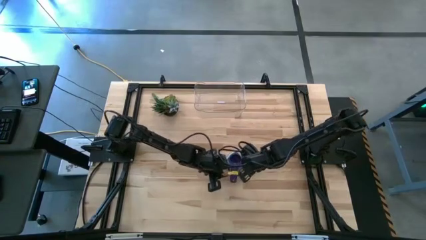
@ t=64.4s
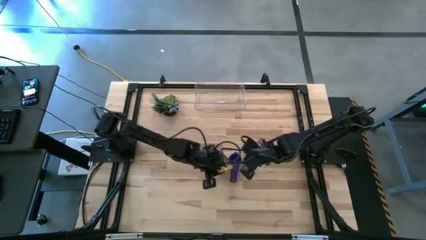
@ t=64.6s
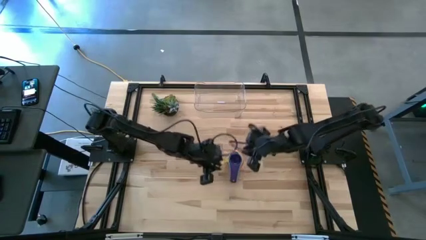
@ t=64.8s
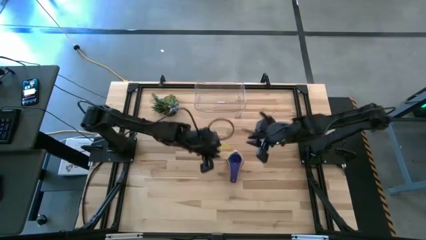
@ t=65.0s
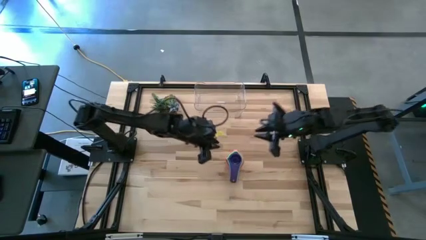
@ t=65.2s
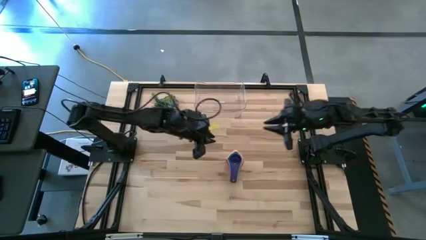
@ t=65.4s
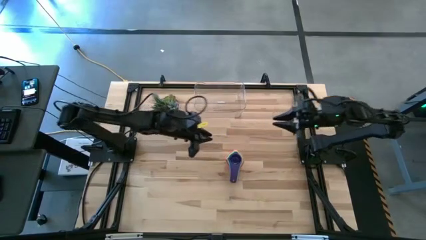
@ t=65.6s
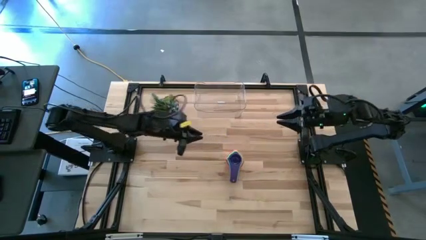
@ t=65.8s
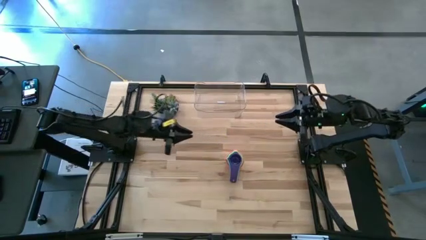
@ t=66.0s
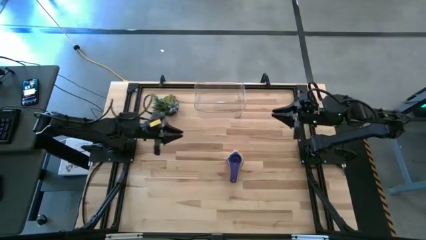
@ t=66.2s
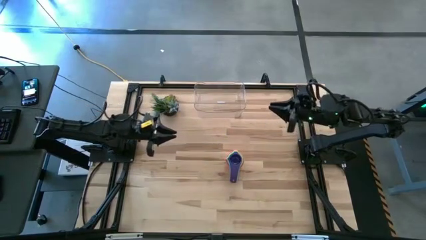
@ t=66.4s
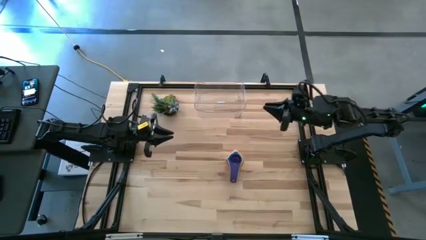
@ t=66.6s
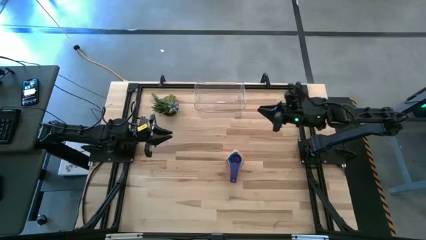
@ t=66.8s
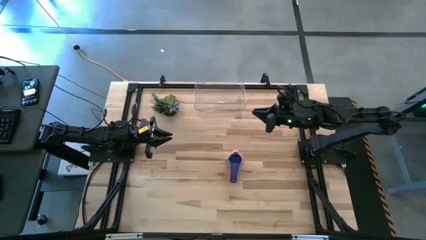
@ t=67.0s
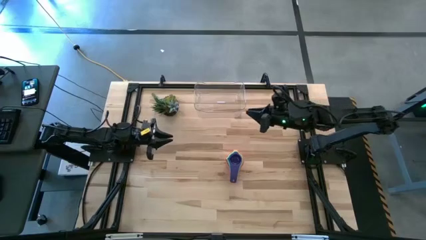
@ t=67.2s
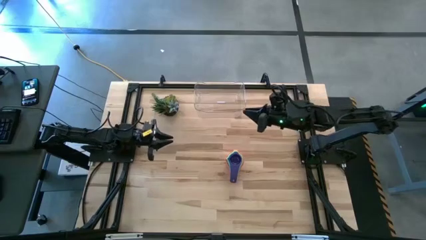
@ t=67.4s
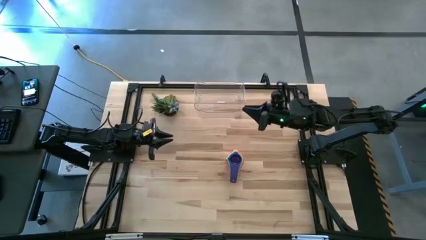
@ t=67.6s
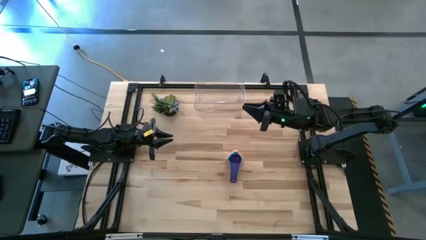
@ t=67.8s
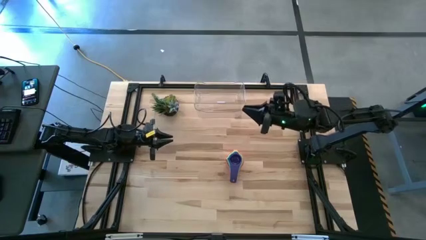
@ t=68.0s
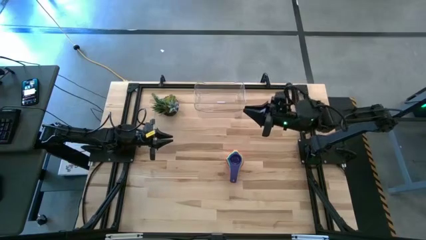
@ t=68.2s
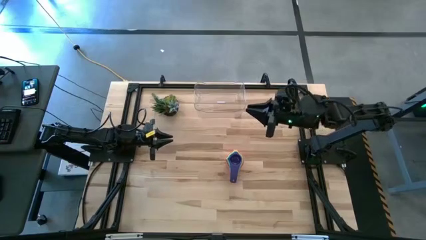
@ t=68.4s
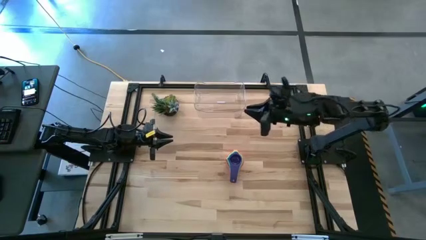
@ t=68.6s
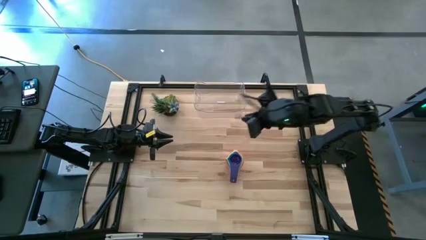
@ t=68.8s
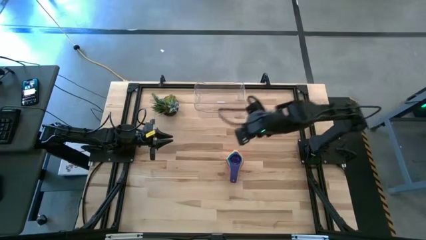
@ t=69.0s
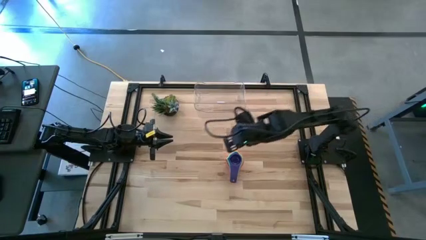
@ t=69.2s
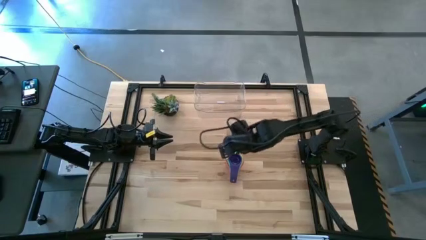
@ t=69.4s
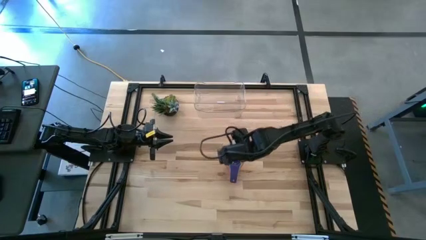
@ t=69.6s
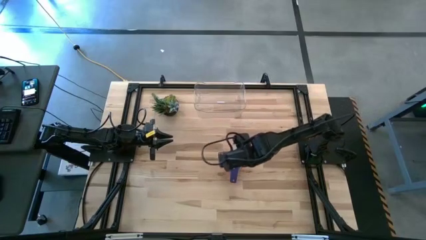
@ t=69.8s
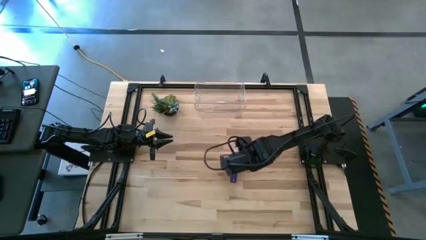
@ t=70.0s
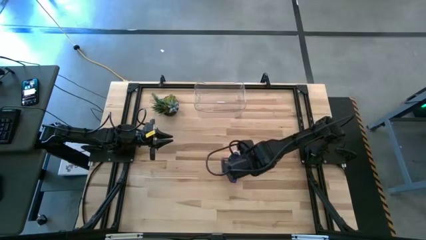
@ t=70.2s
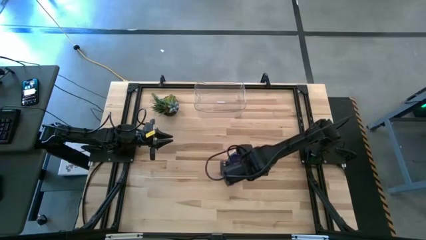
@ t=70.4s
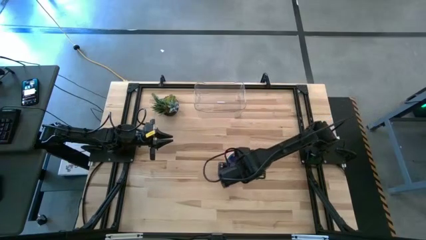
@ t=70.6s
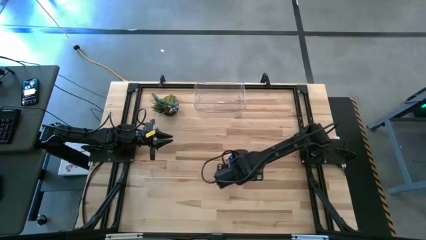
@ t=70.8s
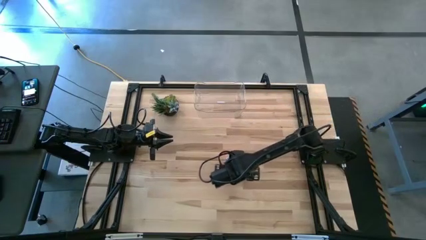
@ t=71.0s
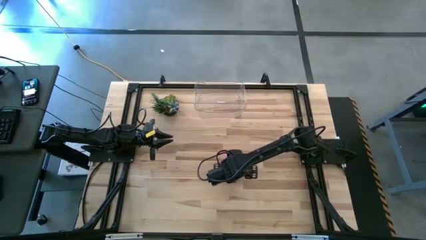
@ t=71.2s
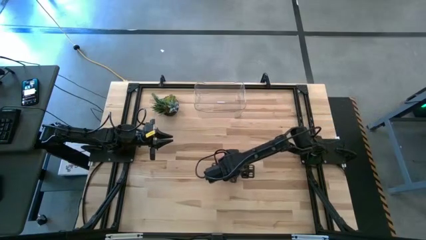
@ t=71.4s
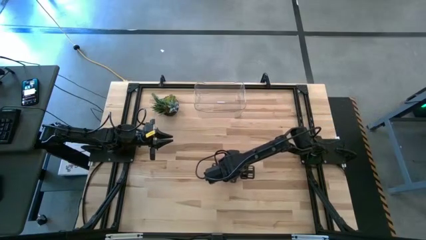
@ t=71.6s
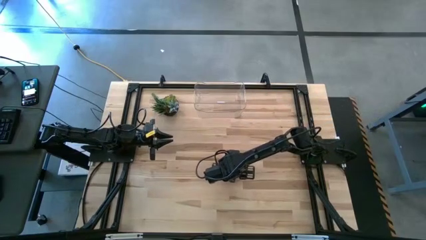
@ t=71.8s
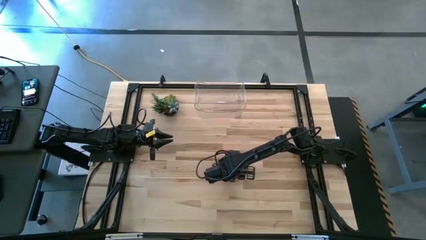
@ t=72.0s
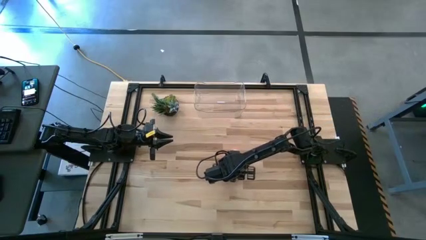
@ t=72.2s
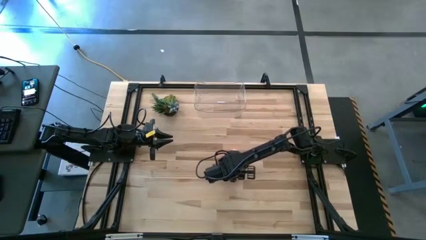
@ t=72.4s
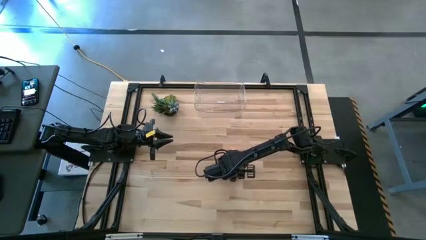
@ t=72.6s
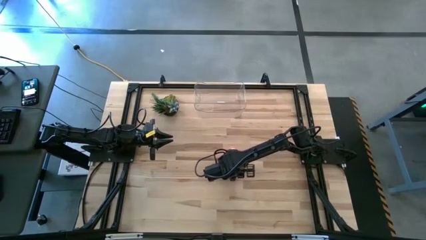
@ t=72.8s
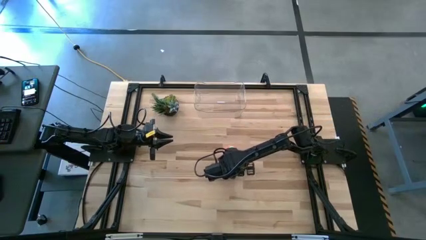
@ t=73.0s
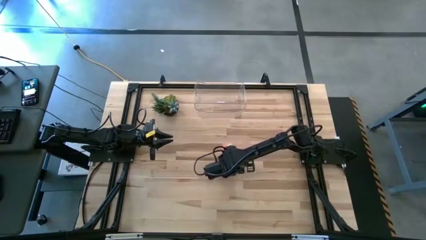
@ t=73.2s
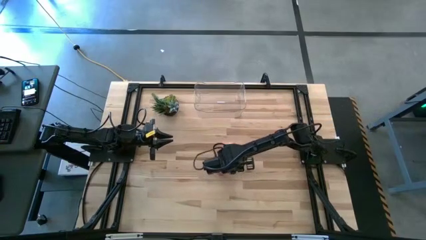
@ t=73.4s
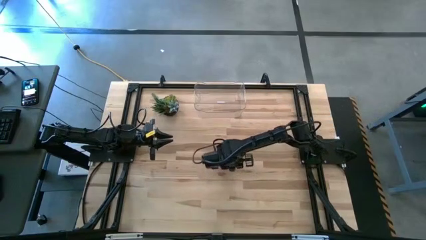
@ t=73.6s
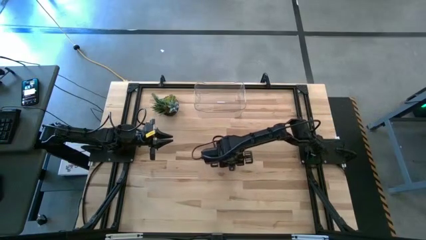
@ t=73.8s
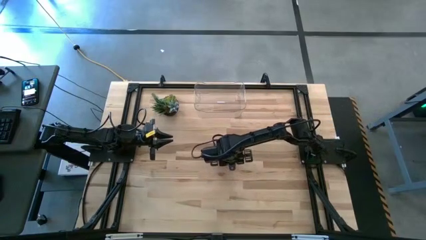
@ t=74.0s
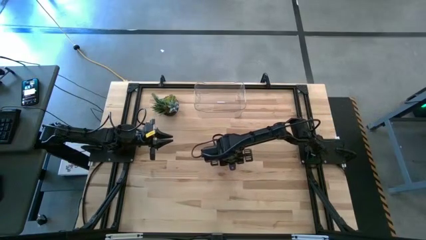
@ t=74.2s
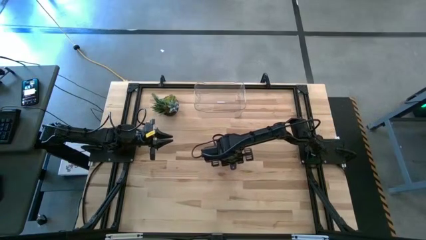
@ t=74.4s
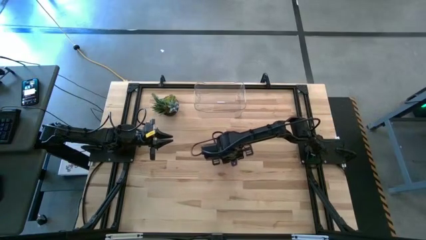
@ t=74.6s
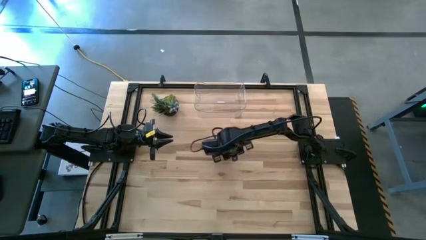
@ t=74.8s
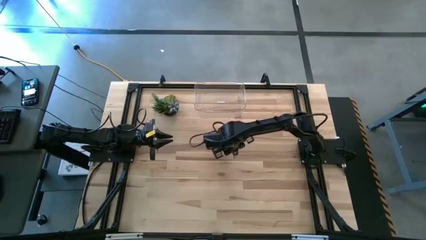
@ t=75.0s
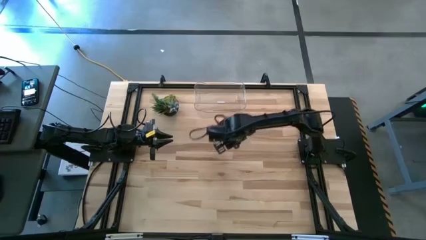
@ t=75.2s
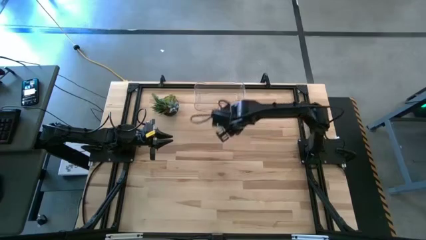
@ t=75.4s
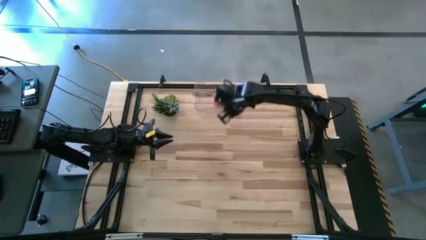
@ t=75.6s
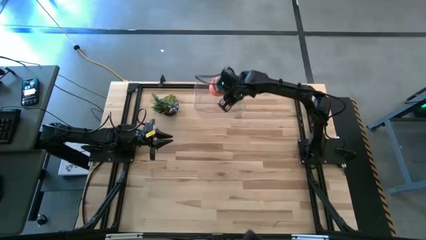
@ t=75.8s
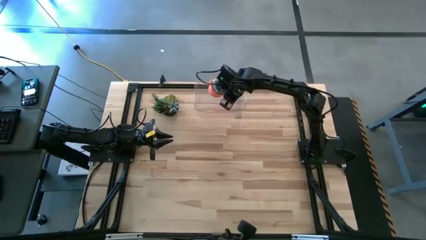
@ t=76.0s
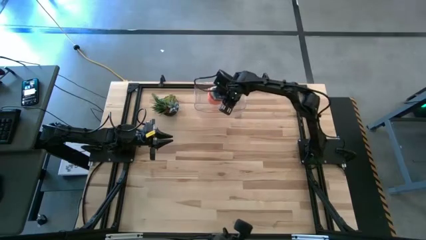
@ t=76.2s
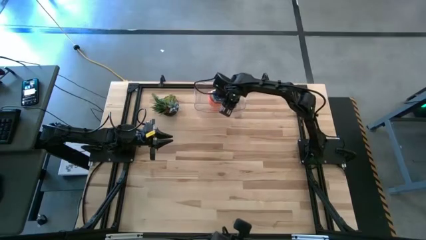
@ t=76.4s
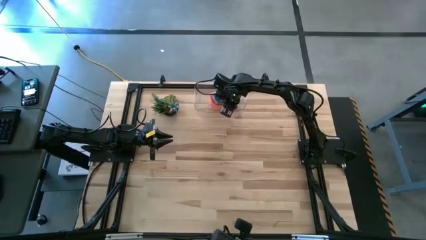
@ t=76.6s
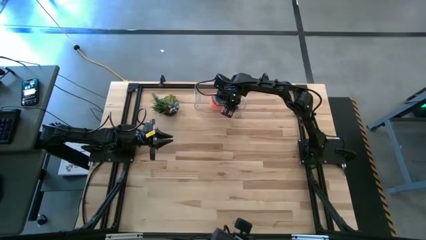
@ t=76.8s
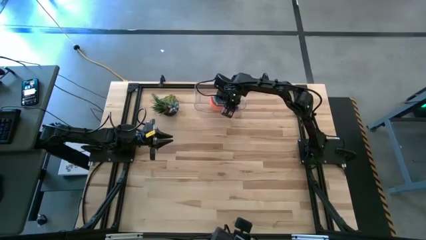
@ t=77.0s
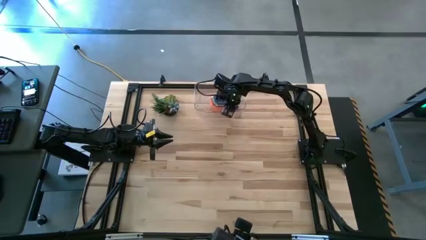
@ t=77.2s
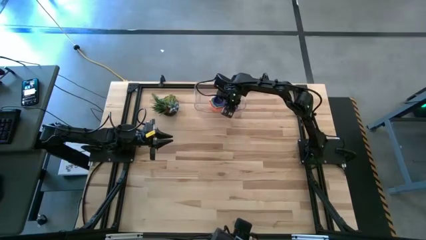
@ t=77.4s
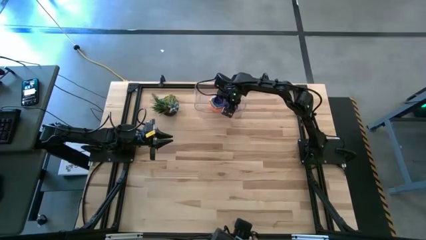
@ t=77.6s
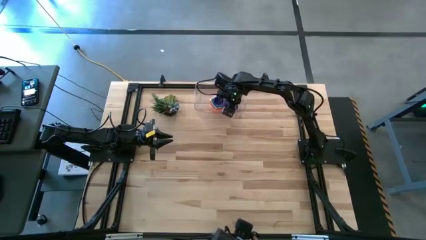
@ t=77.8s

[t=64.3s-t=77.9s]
Task: Nest measuring cups in basket
Put the nested measuring cups into the transparent bin

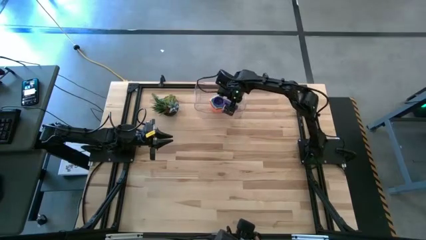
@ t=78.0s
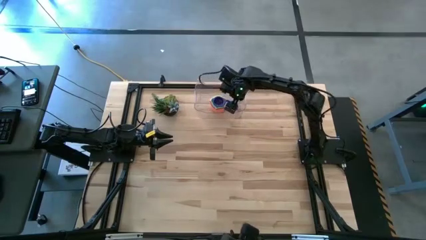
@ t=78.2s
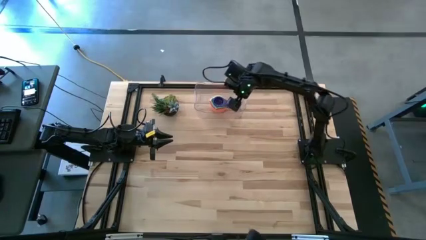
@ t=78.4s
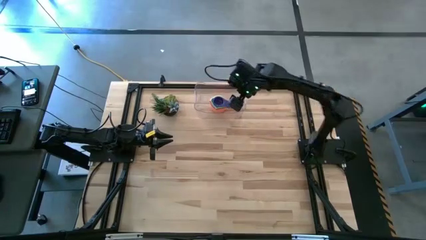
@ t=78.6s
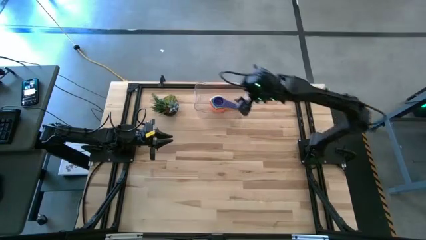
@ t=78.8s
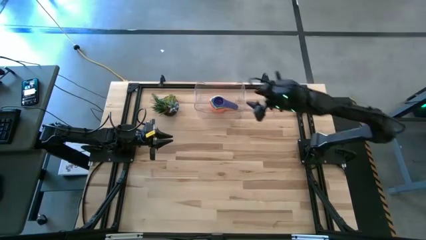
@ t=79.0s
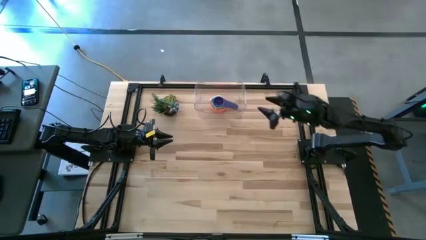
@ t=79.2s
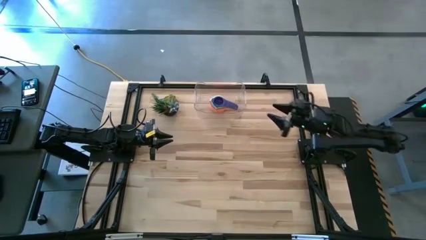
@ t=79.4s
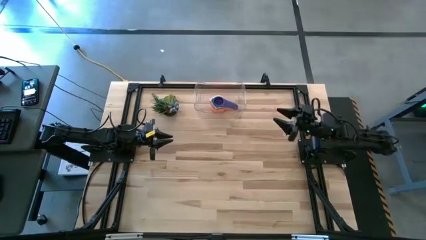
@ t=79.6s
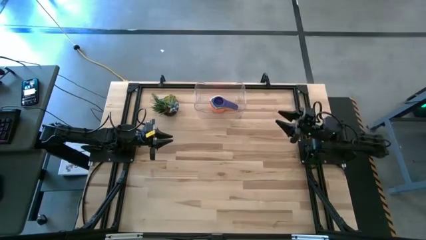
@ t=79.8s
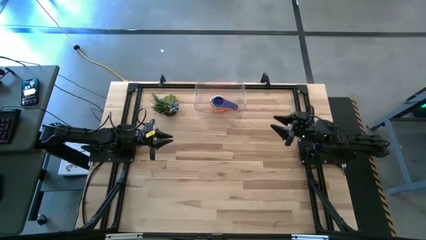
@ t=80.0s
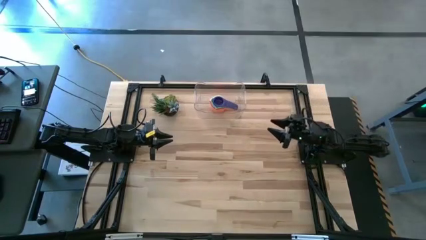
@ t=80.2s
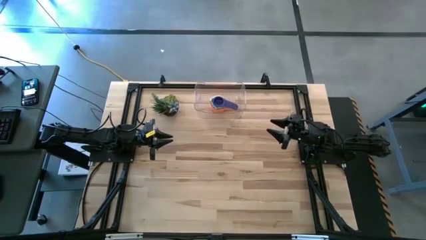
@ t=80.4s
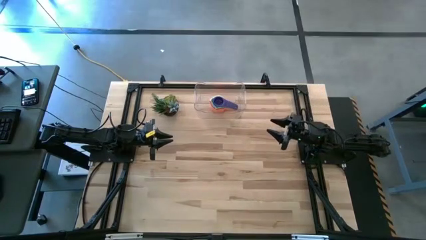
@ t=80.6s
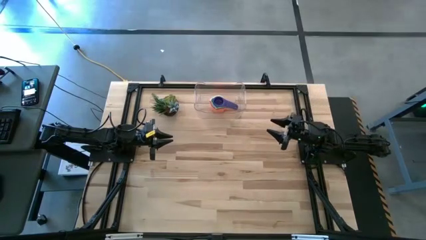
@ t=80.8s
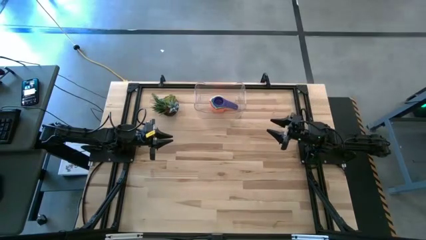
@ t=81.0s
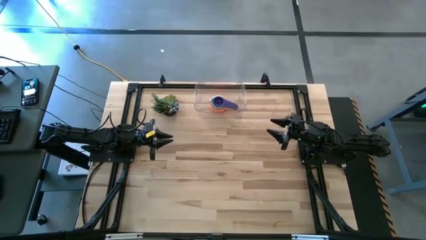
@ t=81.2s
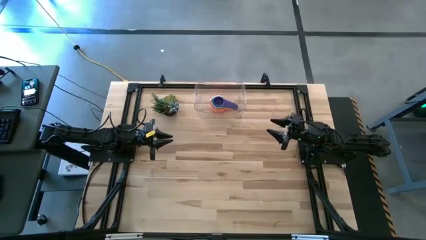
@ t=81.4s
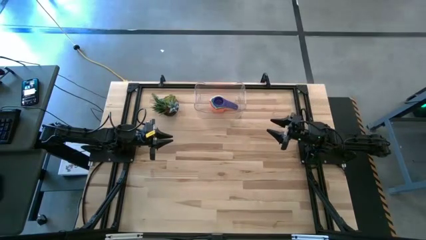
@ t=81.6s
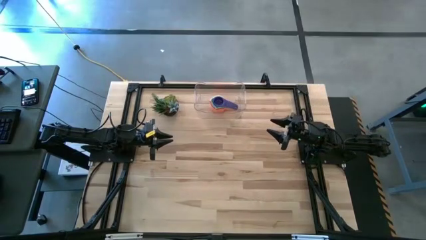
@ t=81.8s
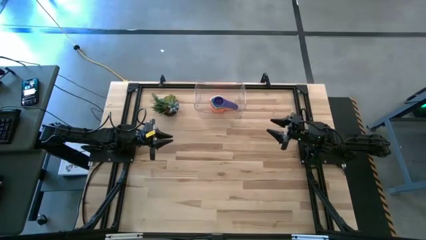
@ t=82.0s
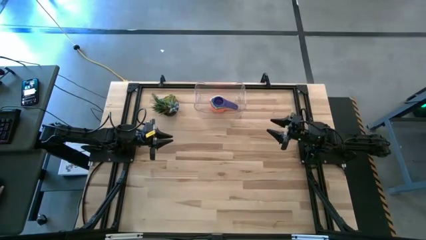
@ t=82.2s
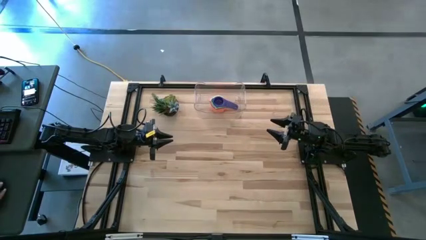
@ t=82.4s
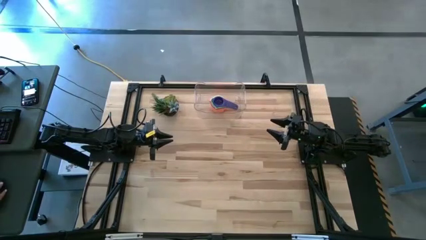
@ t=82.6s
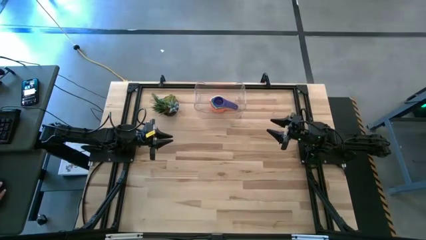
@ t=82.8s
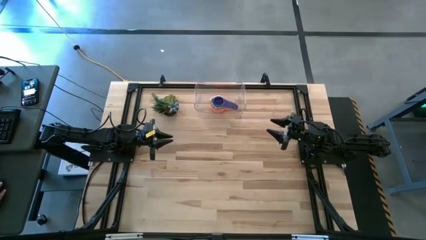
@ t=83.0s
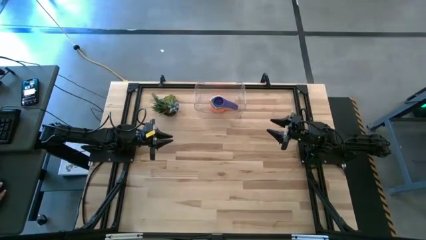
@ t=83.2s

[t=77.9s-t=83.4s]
Return to Home Position
